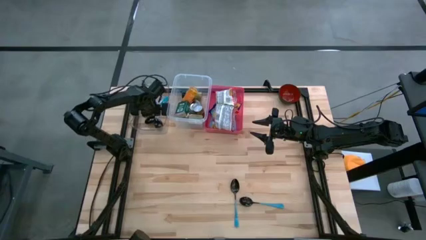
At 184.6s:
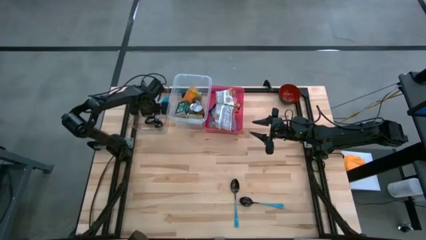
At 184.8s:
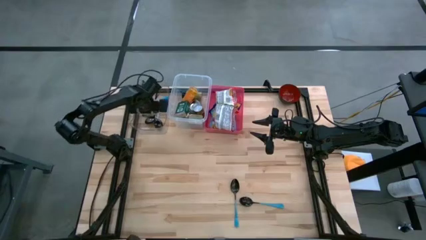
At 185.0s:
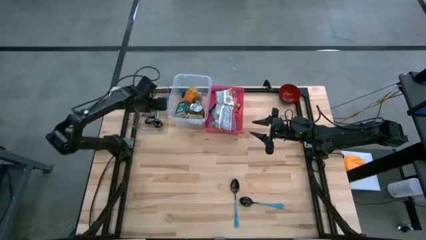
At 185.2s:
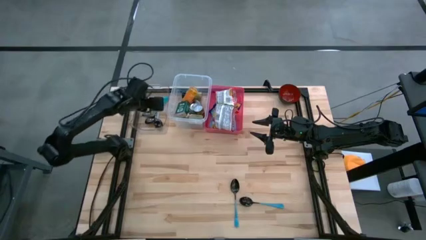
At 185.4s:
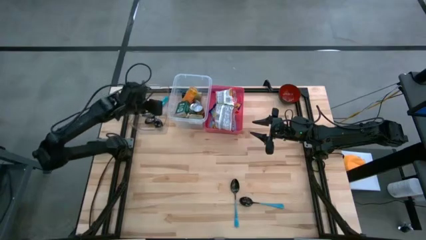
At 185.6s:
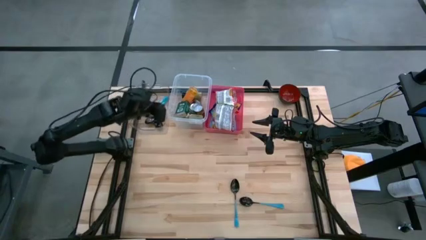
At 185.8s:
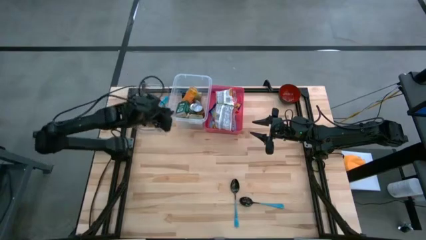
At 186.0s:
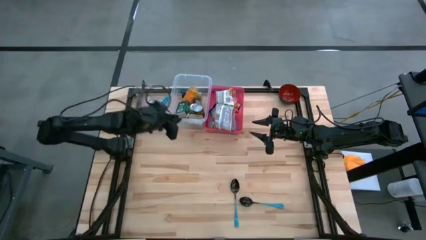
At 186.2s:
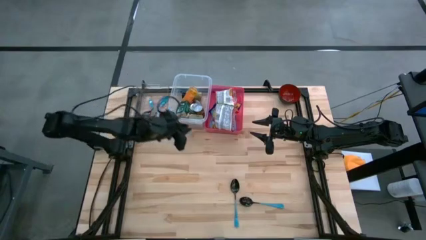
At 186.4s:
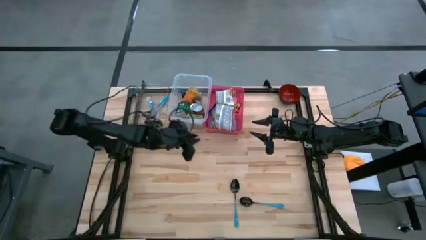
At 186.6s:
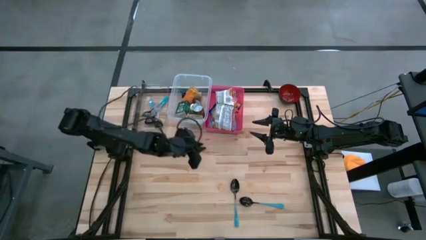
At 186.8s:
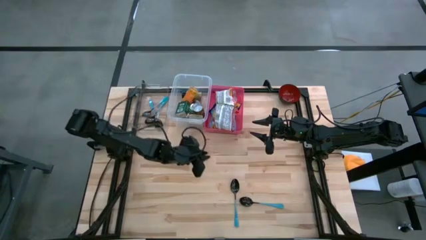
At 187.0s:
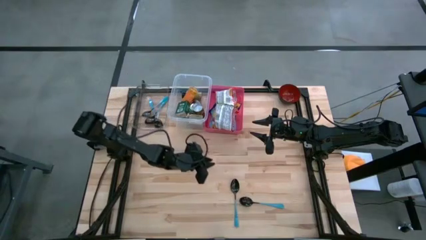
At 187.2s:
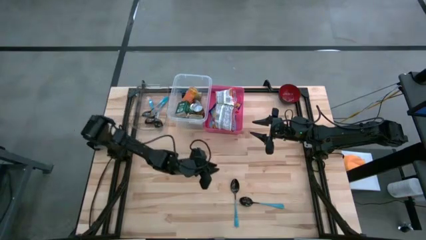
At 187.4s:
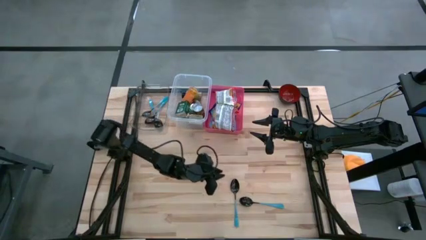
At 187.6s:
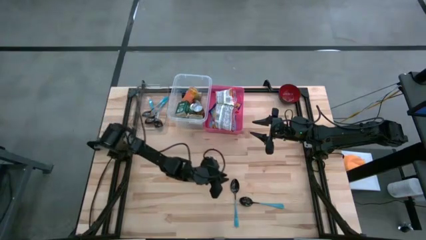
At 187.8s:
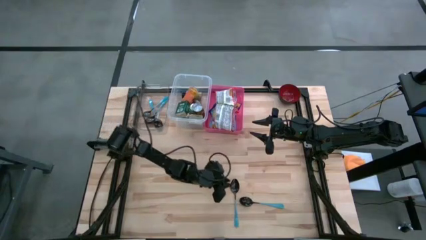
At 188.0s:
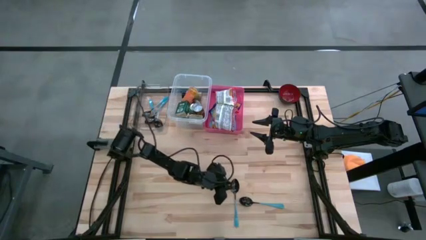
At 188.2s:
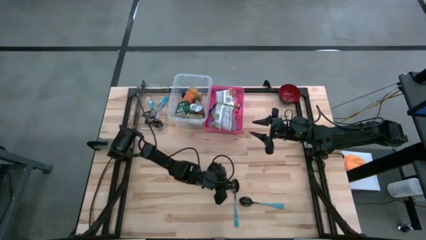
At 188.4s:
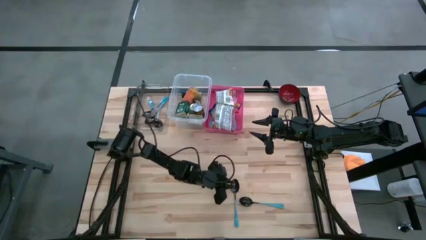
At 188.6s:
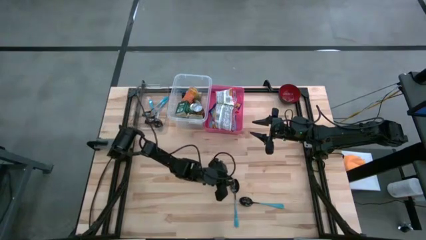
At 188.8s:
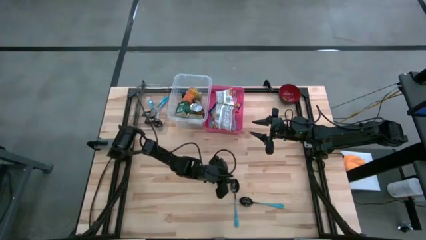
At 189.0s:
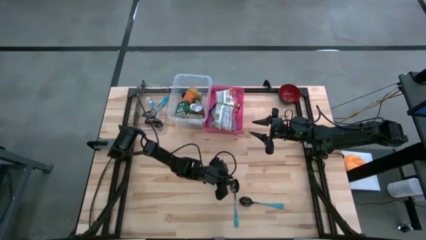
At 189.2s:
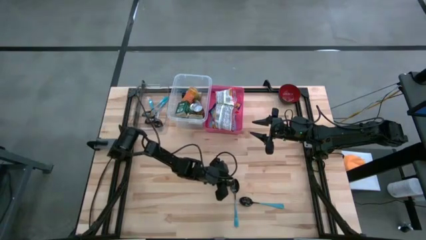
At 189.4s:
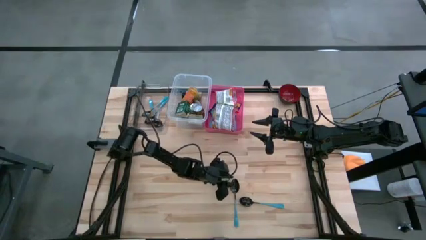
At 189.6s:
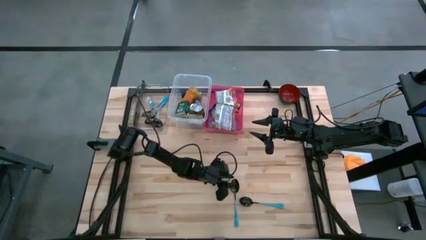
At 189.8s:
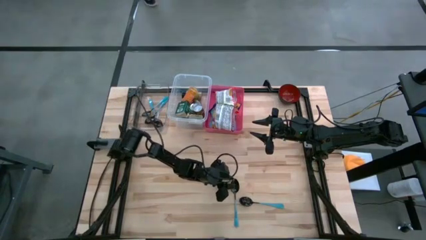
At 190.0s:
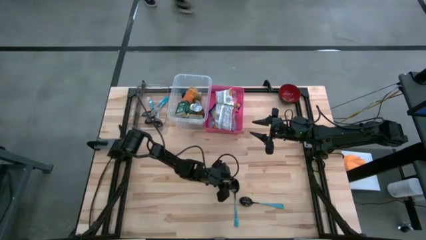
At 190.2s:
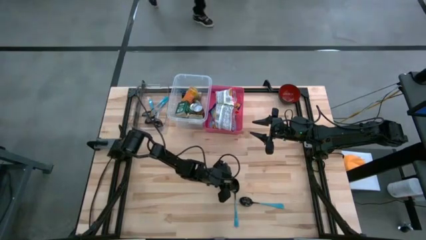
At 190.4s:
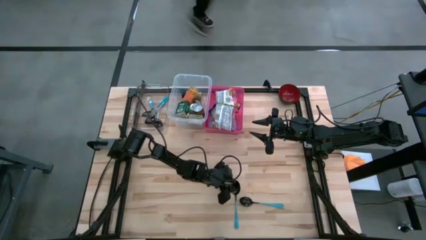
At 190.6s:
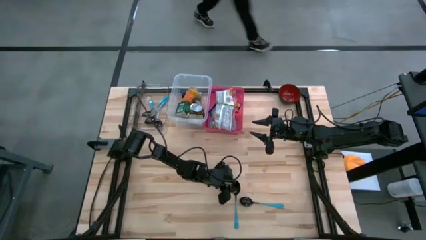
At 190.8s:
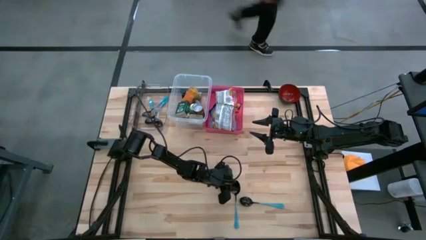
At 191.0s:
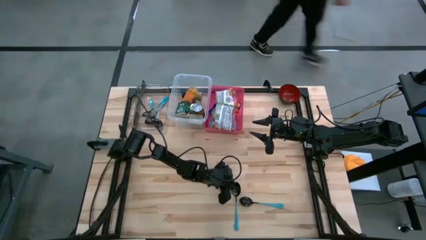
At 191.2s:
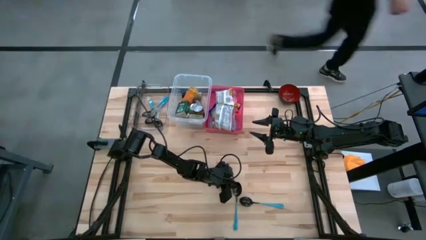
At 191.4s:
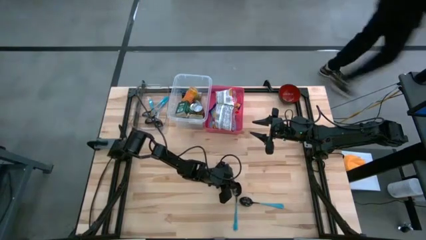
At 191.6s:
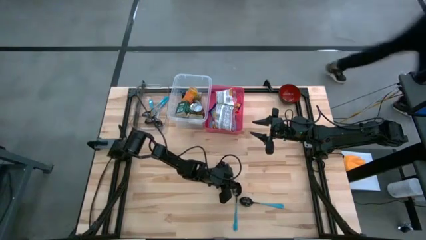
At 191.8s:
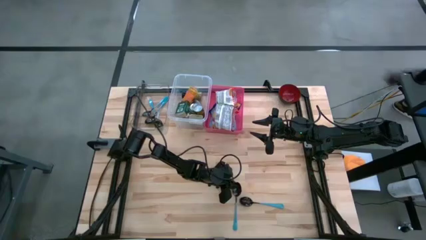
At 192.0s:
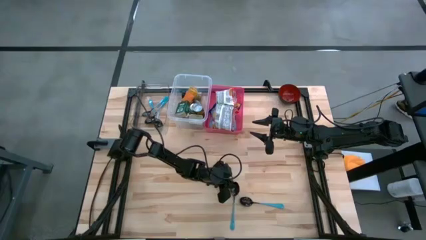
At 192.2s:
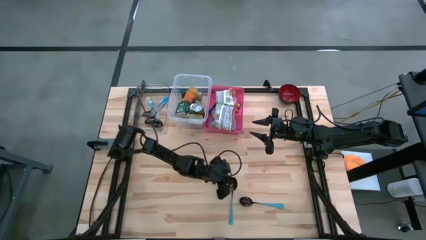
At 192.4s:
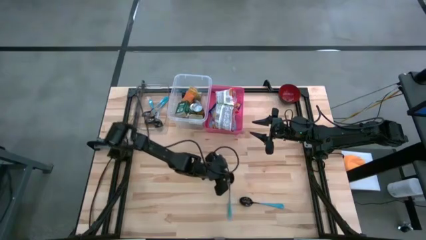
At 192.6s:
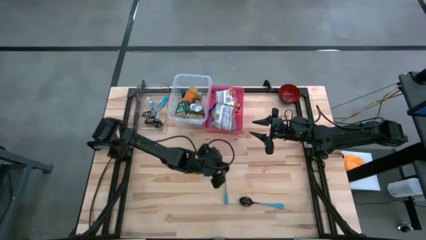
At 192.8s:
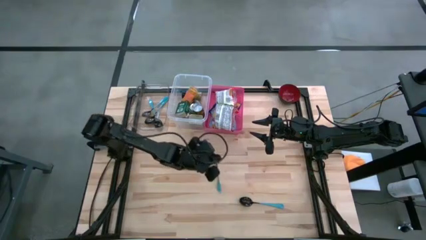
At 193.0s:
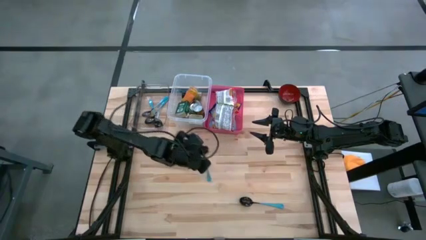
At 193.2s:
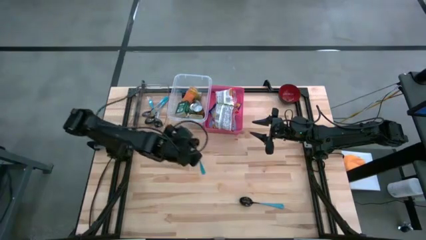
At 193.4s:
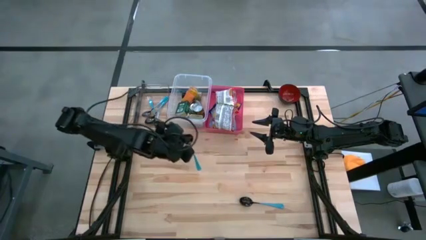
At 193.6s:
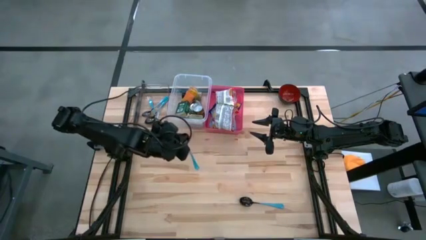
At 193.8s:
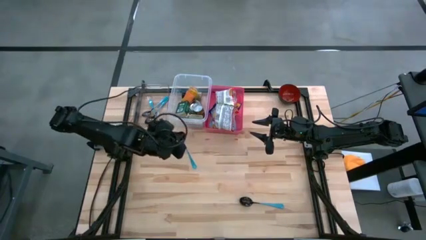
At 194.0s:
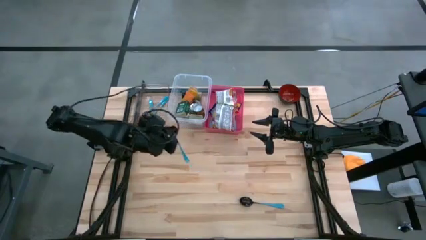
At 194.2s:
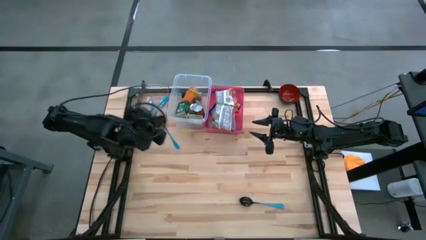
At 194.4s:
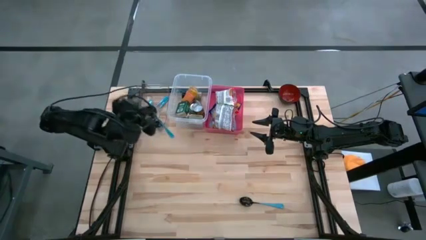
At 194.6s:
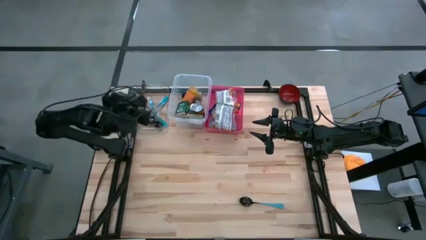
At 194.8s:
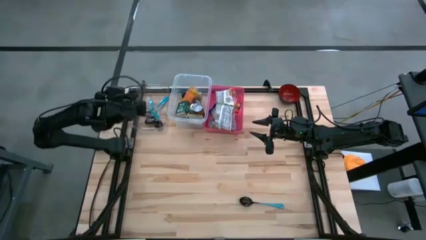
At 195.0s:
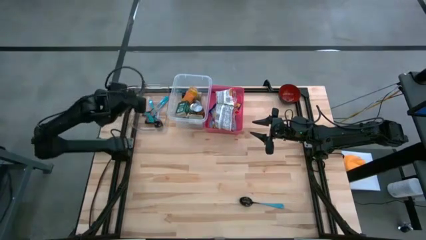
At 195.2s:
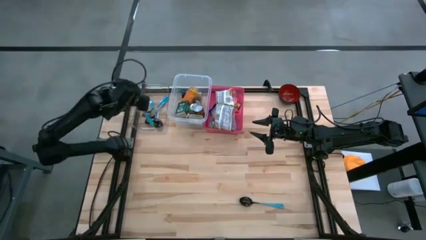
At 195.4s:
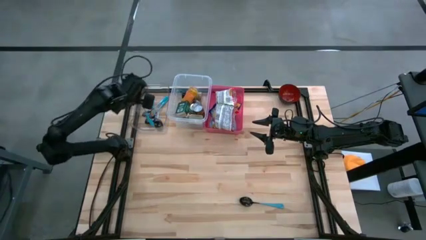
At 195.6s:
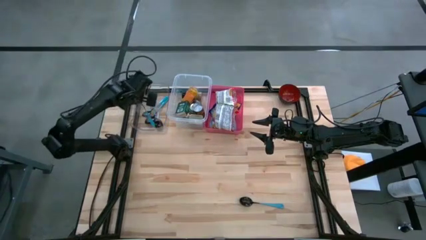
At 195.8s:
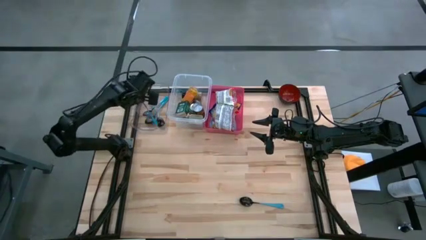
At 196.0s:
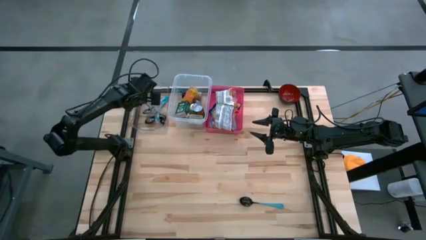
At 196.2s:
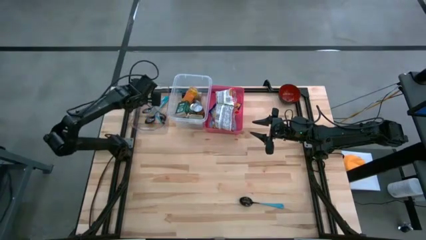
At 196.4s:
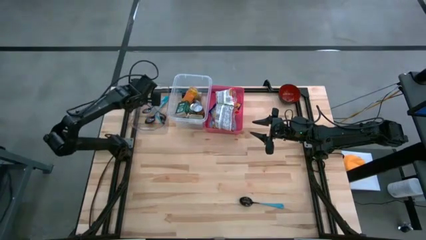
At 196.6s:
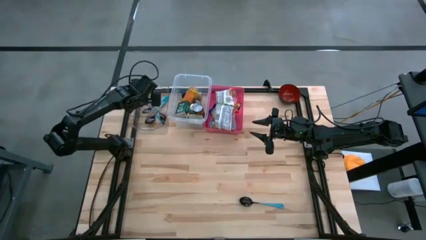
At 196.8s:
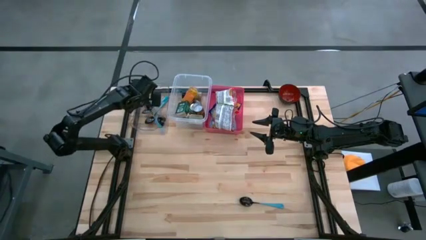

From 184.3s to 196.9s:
Put the blue spoon into the left transparent bin

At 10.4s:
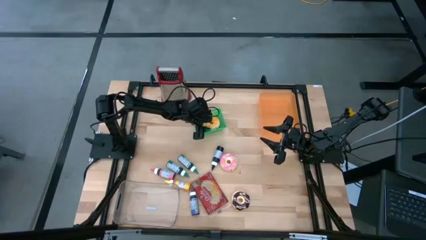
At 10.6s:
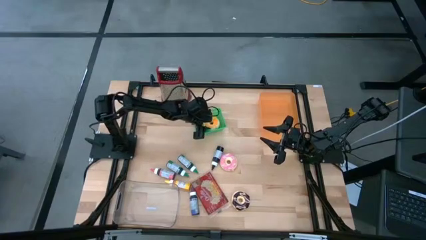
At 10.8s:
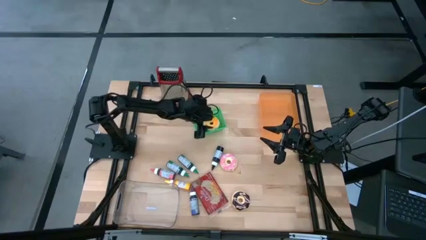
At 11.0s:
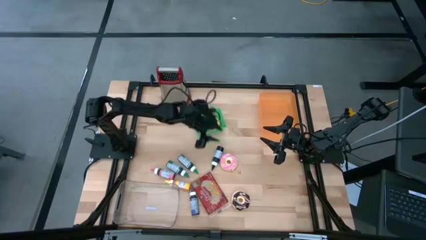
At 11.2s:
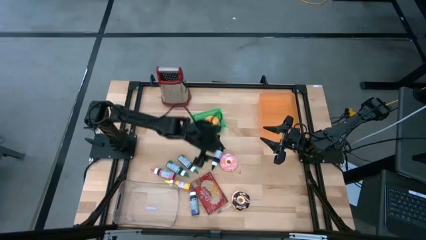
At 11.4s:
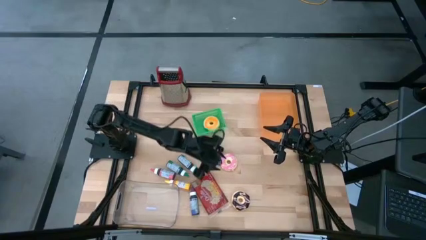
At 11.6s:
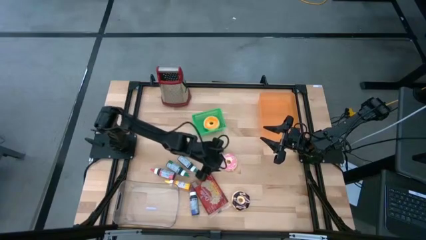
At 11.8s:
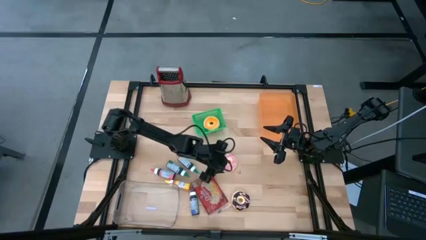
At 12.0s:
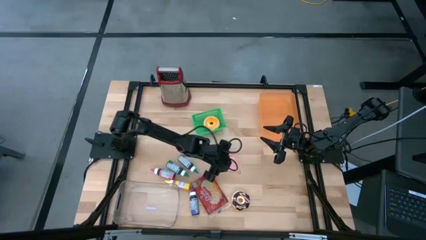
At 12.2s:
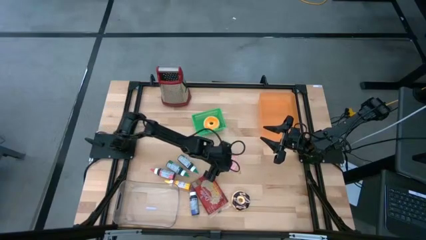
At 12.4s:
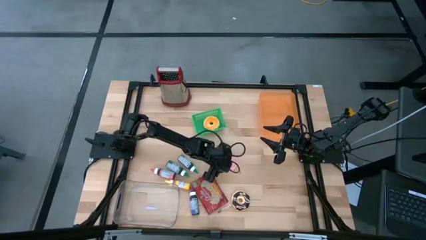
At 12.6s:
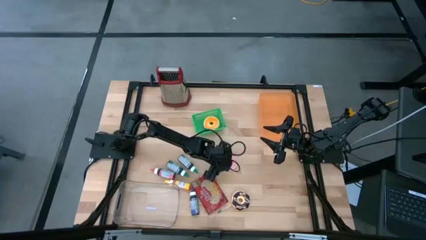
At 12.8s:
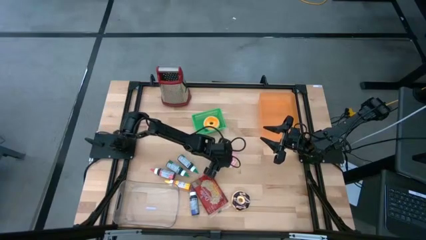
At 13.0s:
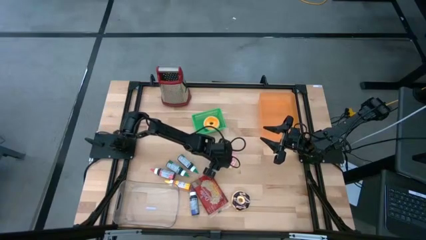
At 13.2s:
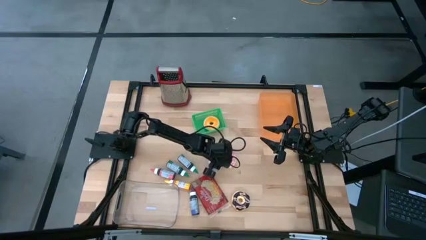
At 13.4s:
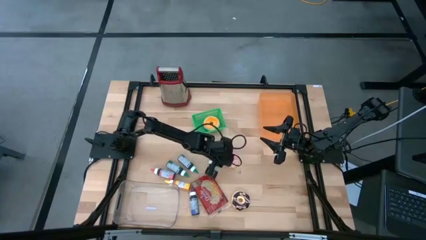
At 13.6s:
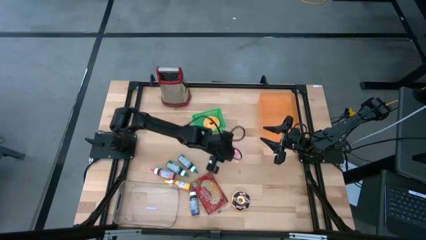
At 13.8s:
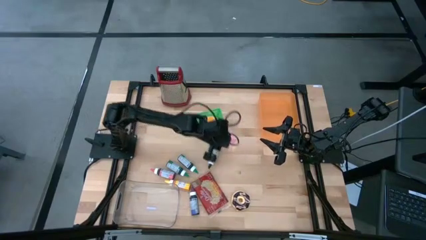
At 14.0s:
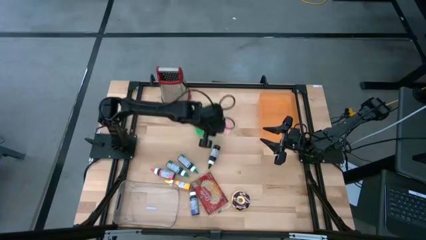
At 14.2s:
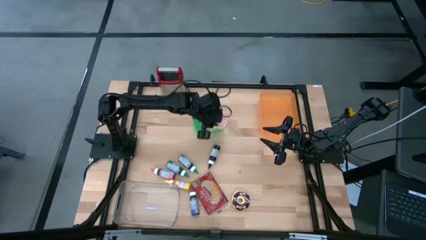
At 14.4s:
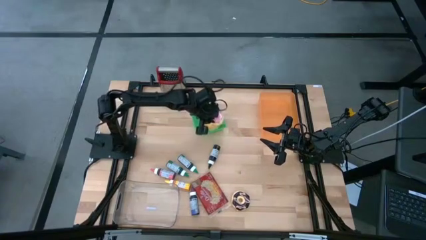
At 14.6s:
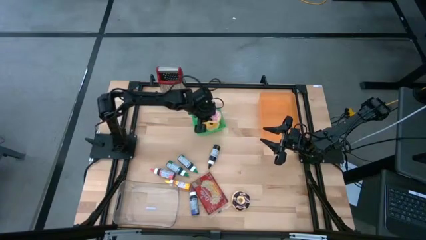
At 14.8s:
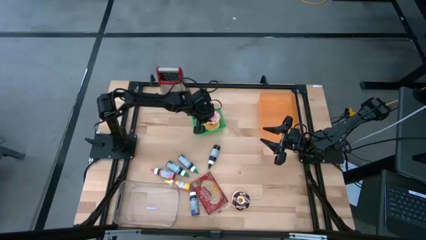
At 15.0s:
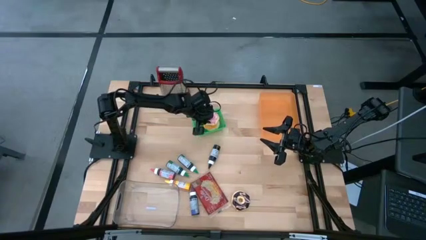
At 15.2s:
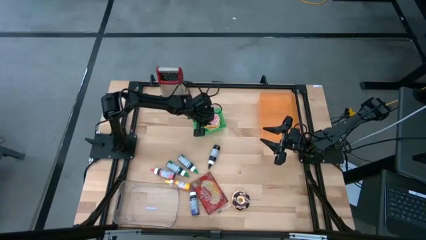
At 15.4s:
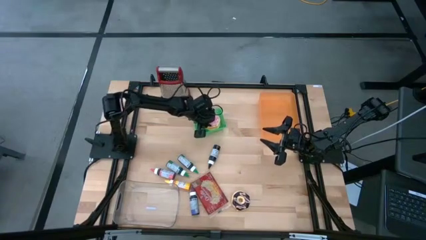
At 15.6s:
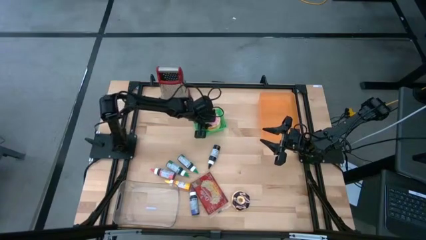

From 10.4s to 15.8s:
Put the pink donut into the green bin
